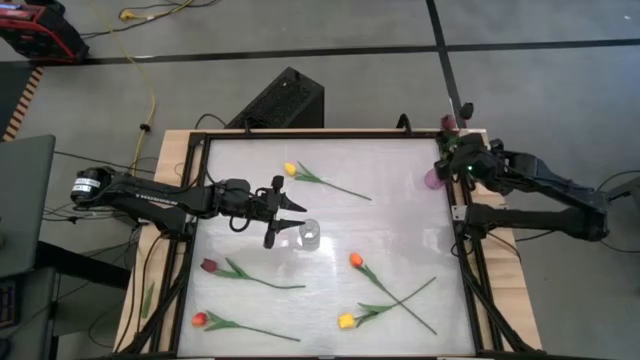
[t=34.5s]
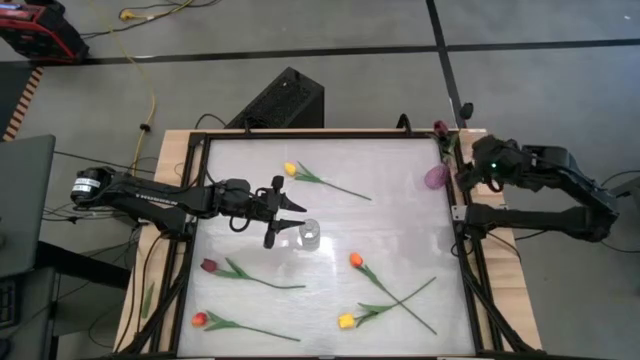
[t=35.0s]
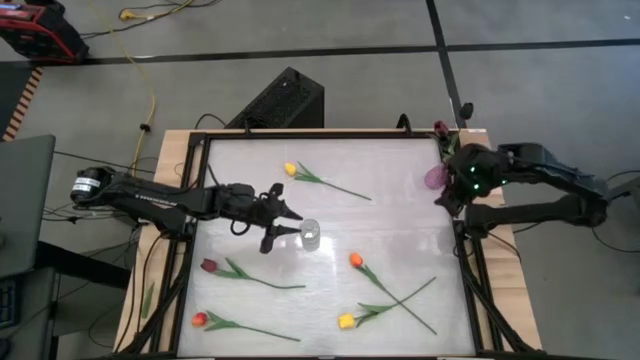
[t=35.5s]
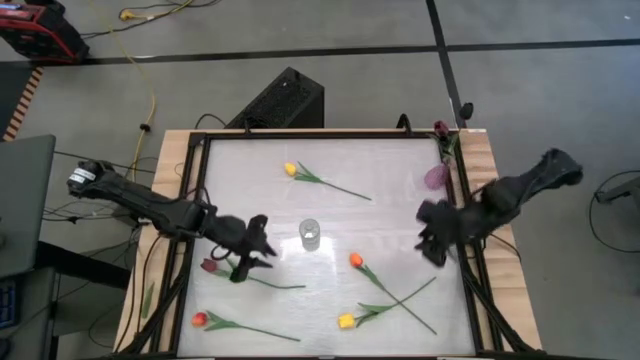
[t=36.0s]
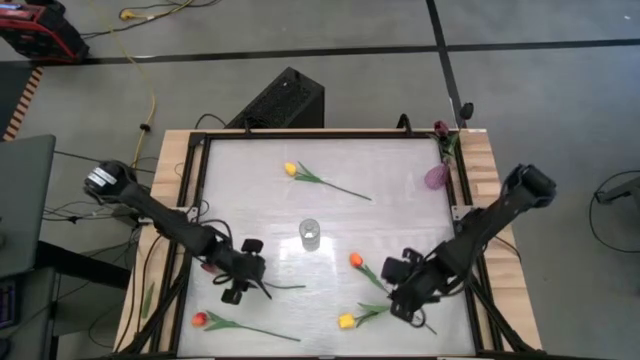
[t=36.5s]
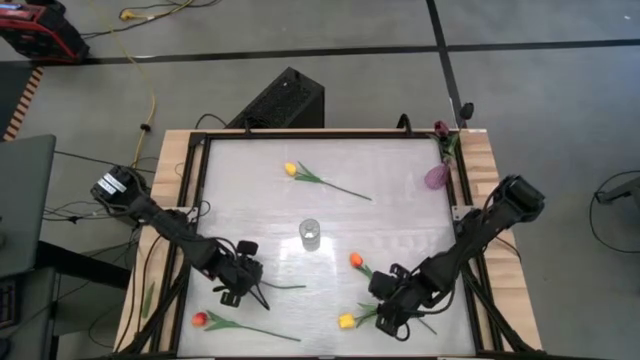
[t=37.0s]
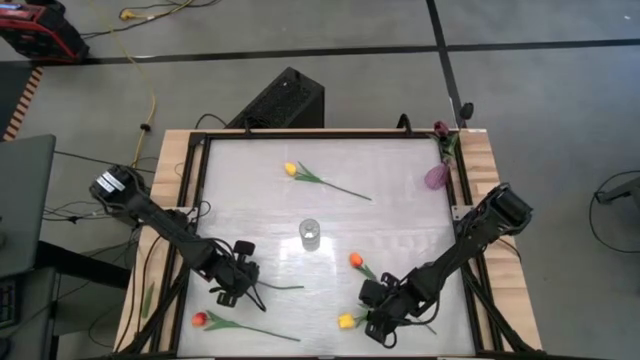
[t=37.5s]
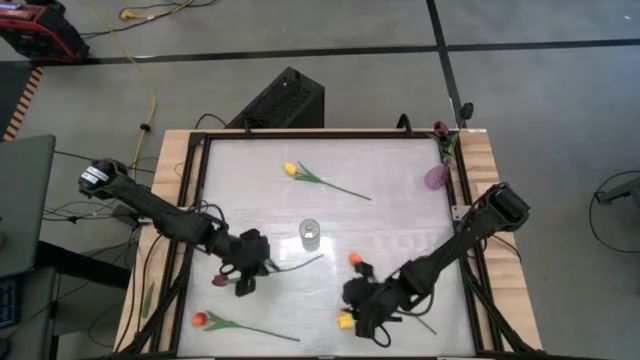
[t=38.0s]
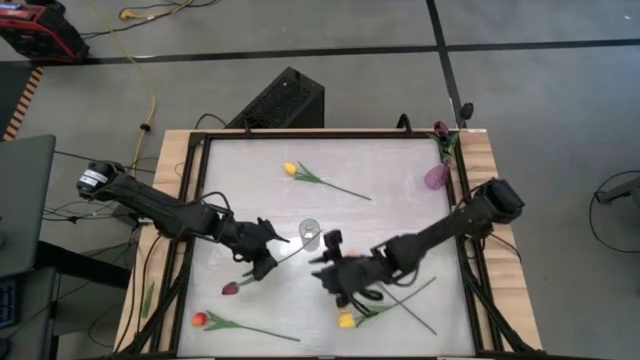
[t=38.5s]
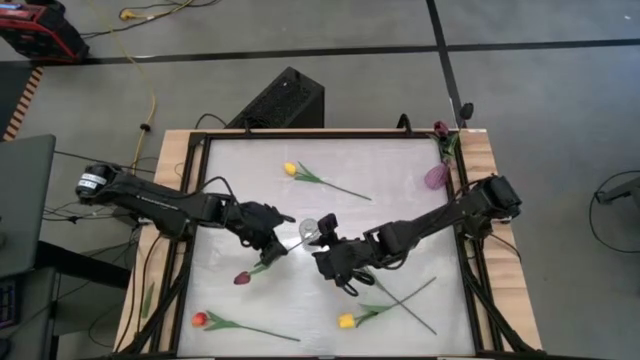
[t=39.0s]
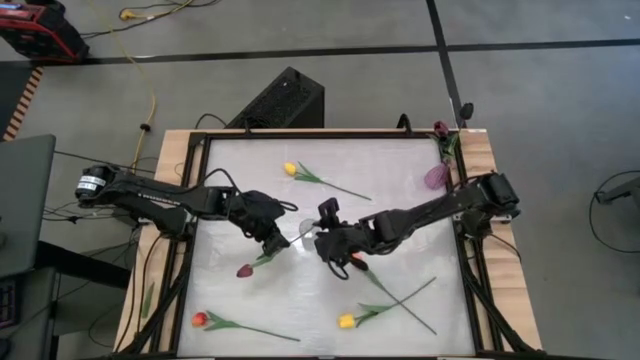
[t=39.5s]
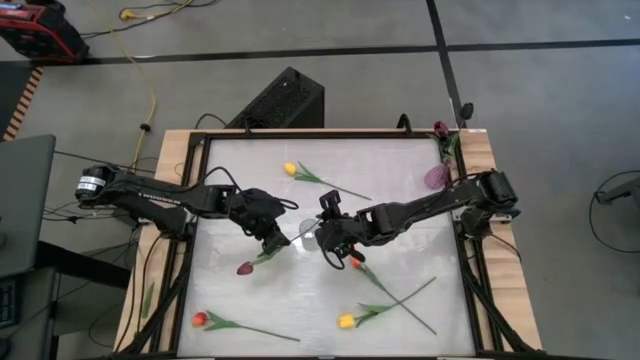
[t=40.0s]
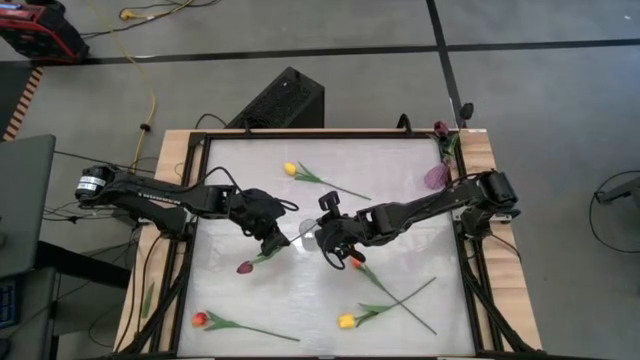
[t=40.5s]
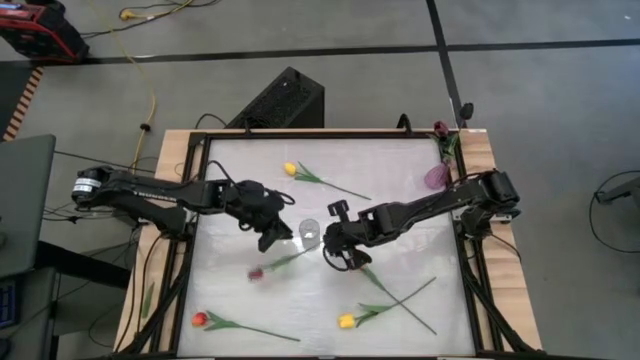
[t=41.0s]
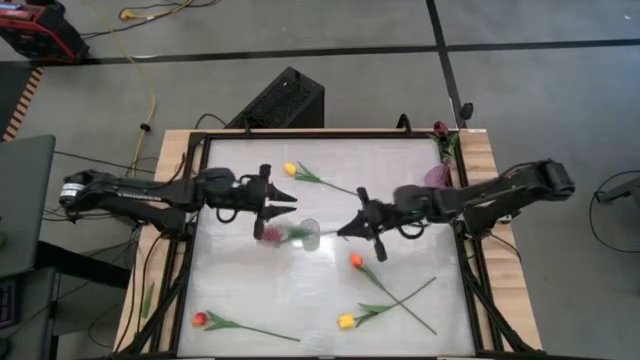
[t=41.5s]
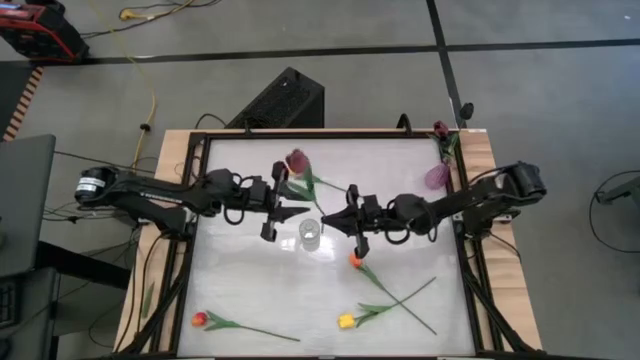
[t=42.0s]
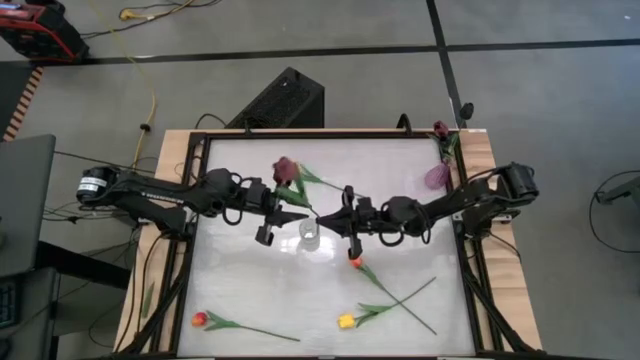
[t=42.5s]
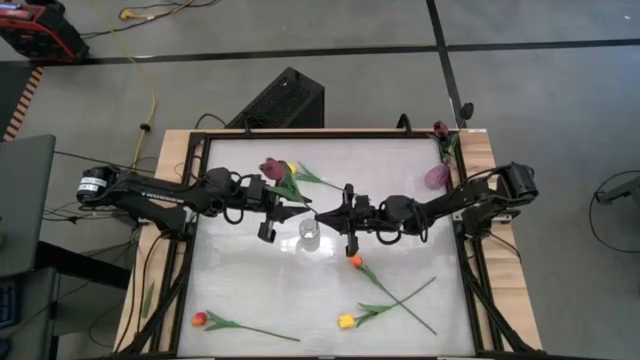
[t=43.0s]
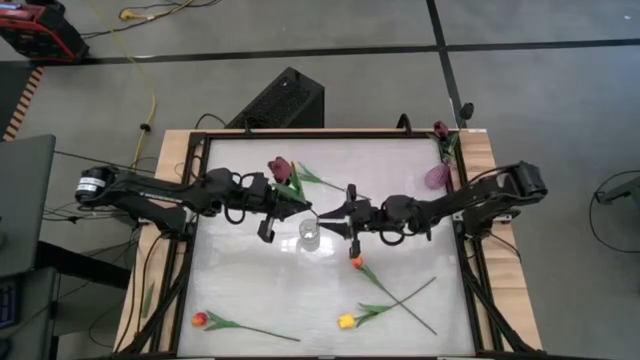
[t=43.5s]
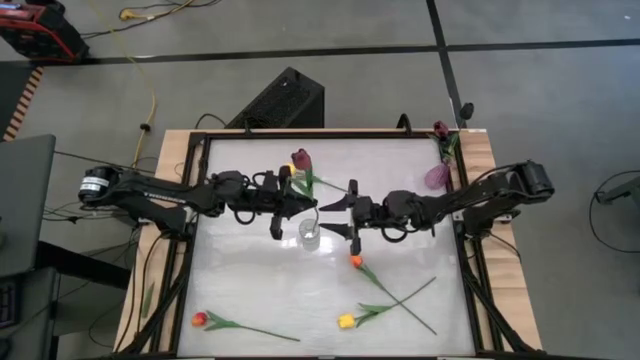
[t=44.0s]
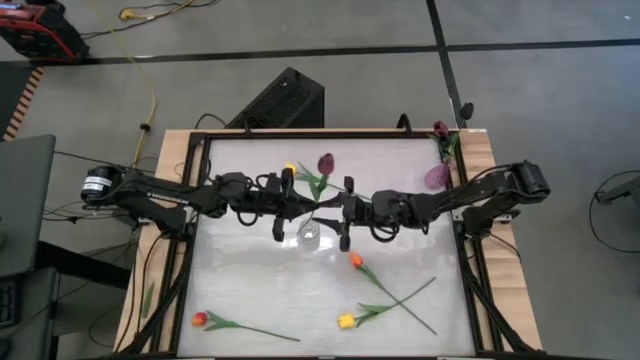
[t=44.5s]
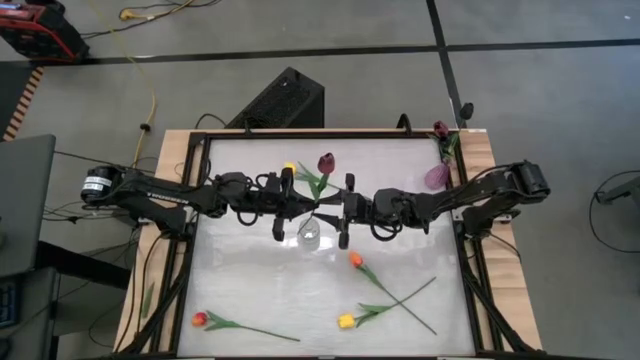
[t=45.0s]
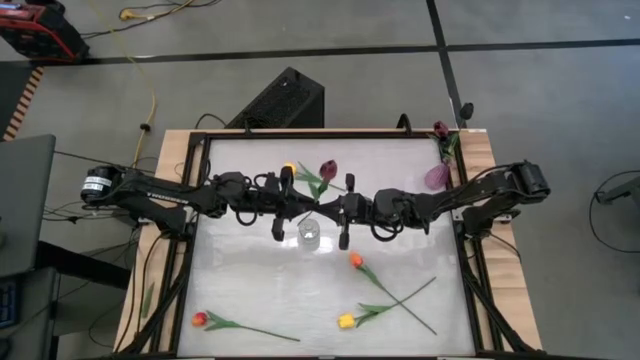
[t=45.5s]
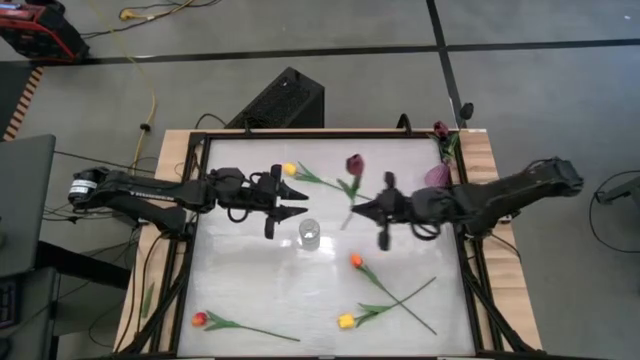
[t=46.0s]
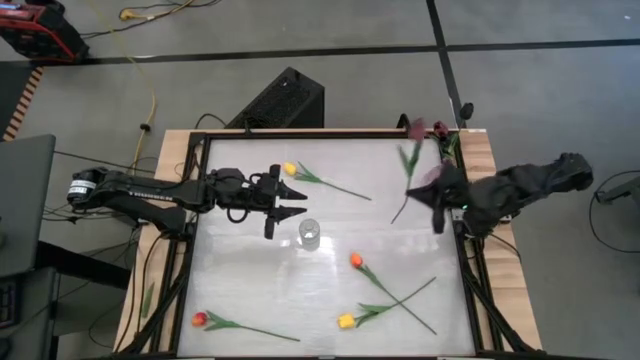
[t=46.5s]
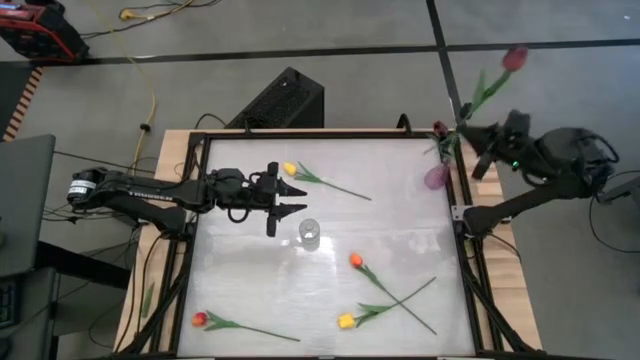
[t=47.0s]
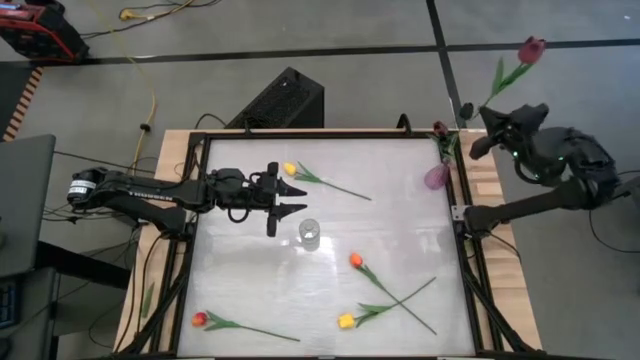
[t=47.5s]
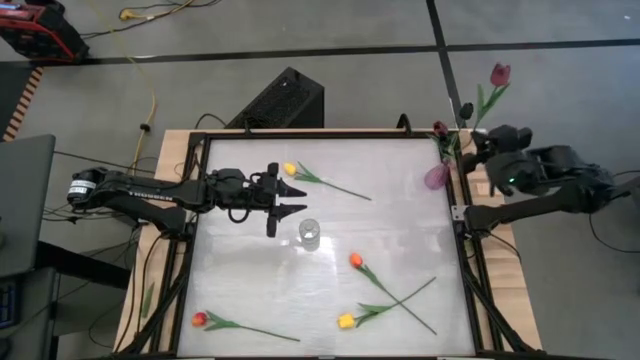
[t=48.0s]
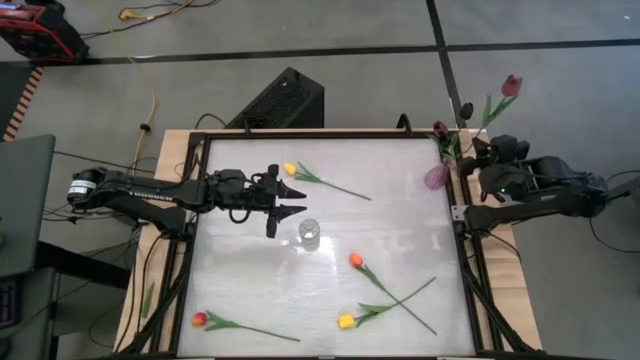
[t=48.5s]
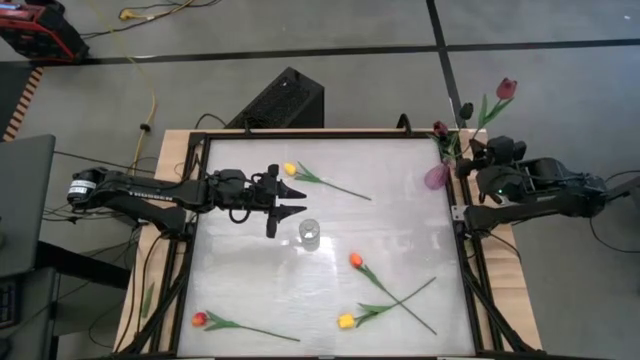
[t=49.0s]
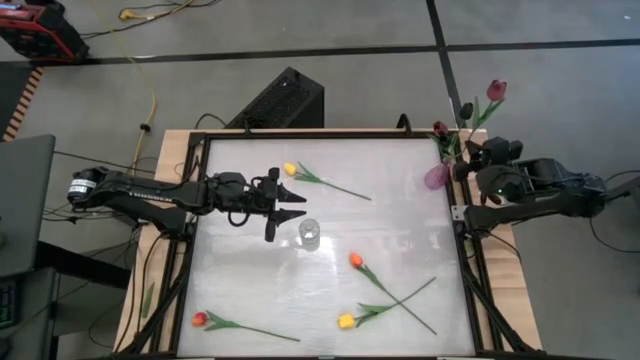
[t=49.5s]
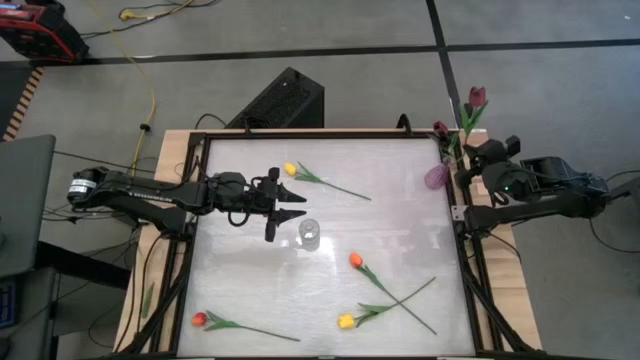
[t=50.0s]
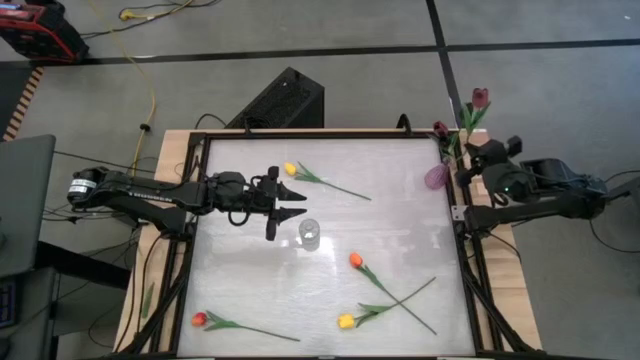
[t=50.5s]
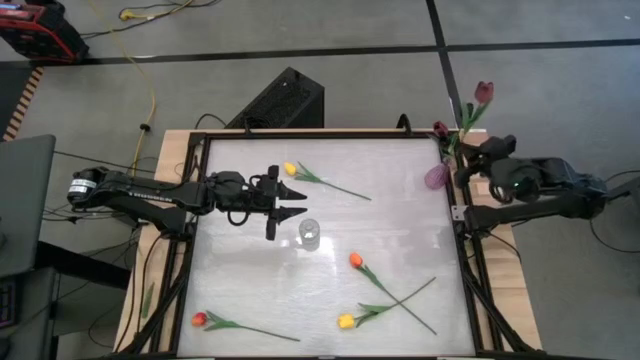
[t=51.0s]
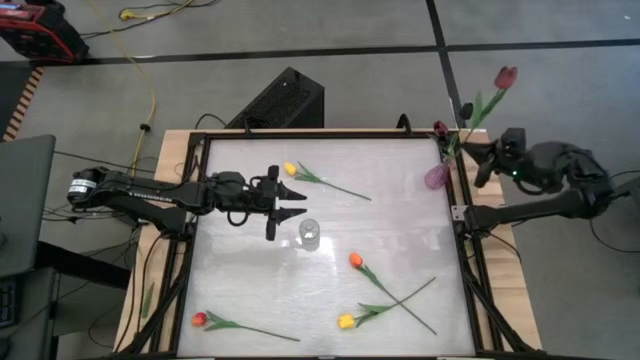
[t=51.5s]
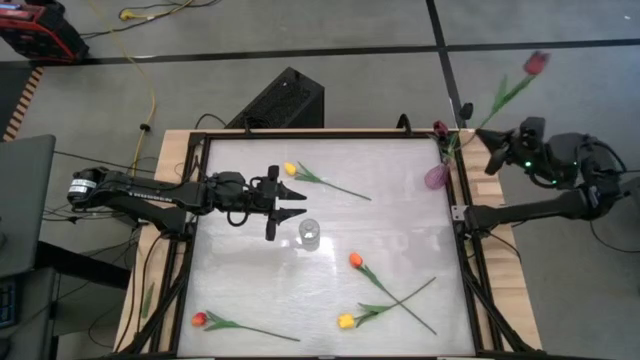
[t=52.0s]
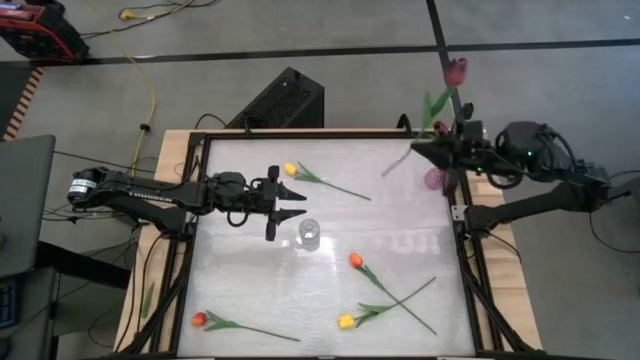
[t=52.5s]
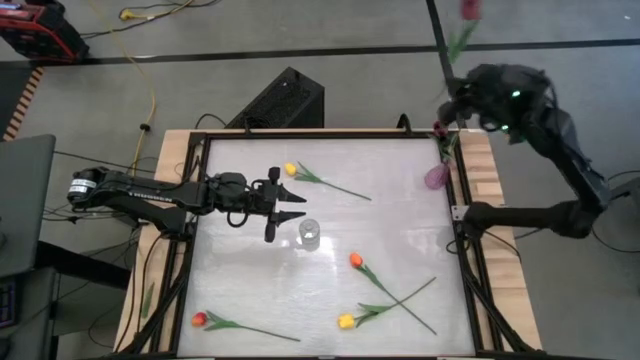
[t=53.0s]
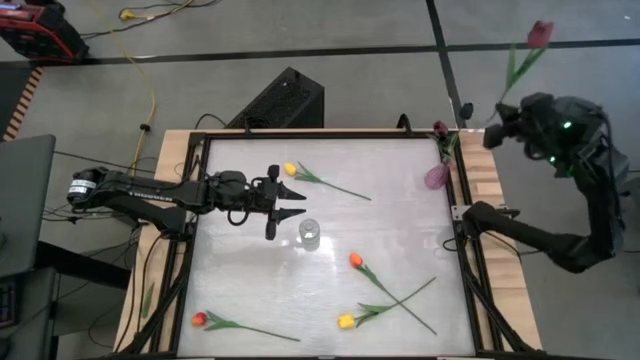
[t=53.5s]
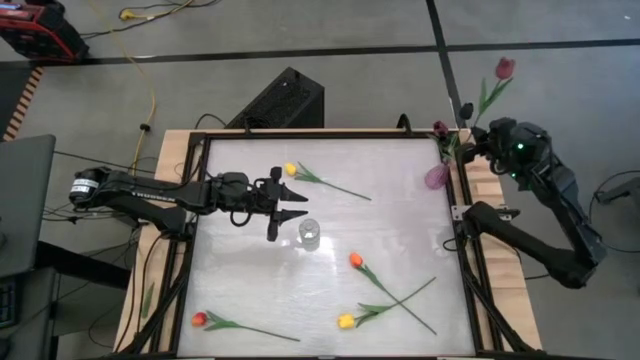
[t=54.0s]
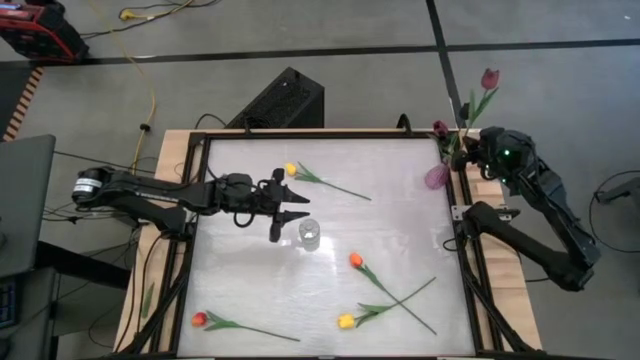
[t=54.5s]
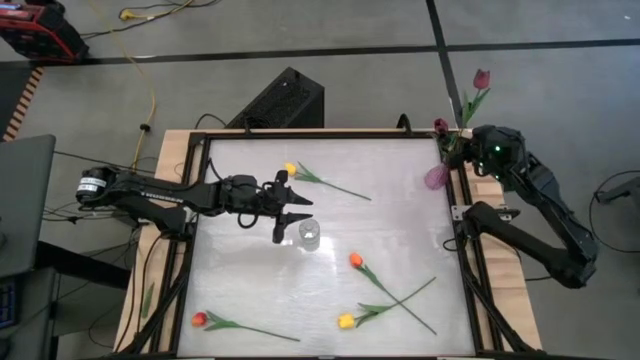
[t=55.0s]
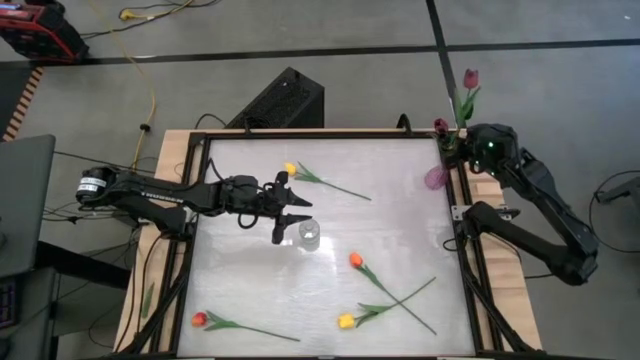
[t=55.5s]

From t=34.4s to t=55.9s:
Task: Sort flowers into vase by color
Put the red flower into the violet vase
